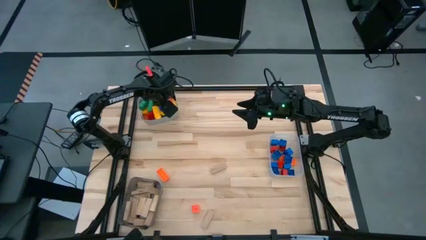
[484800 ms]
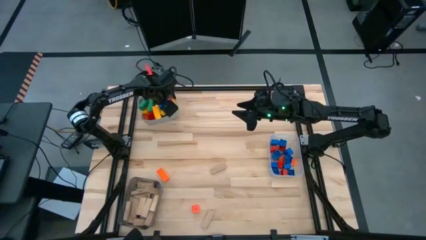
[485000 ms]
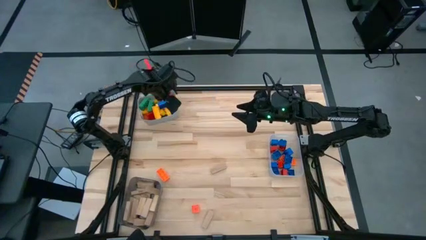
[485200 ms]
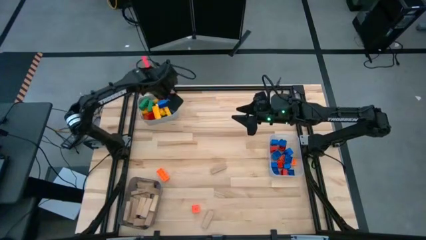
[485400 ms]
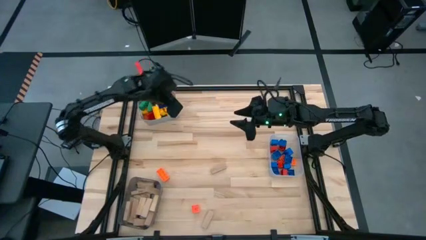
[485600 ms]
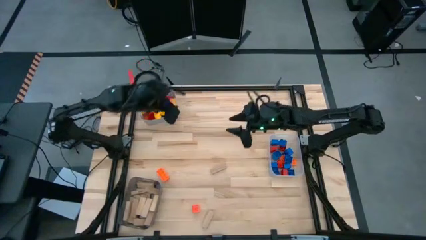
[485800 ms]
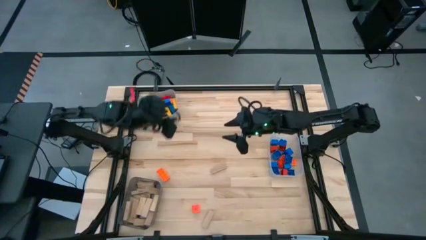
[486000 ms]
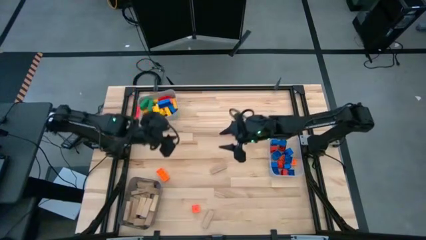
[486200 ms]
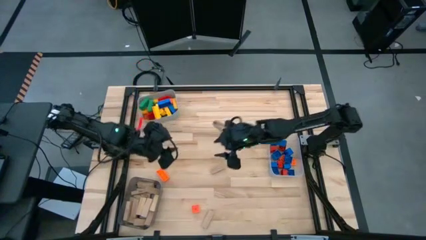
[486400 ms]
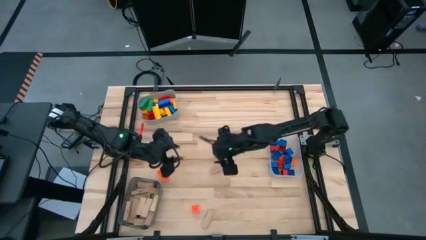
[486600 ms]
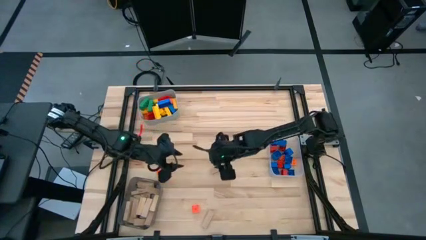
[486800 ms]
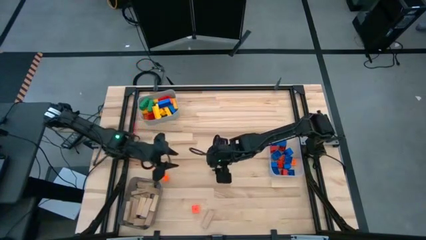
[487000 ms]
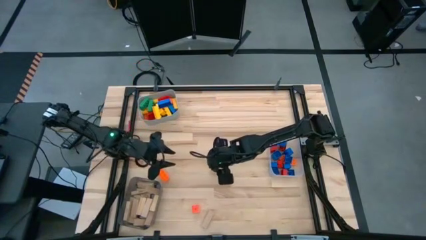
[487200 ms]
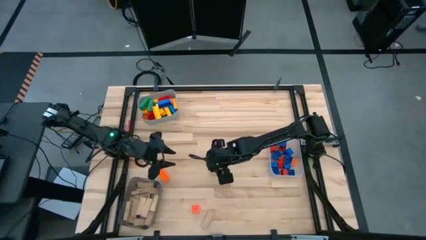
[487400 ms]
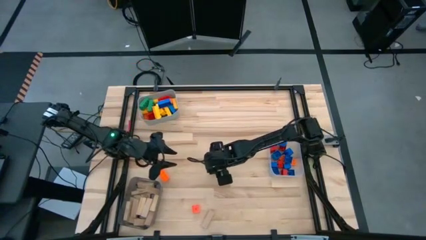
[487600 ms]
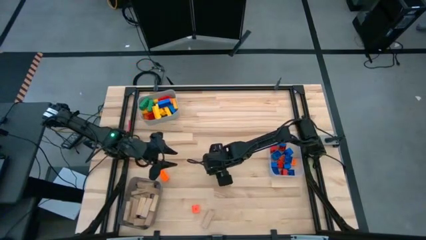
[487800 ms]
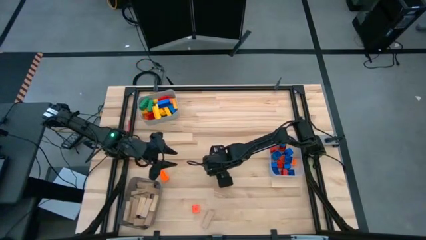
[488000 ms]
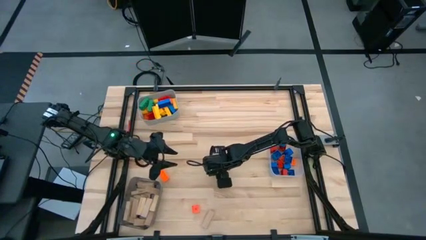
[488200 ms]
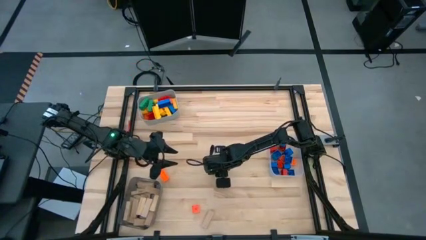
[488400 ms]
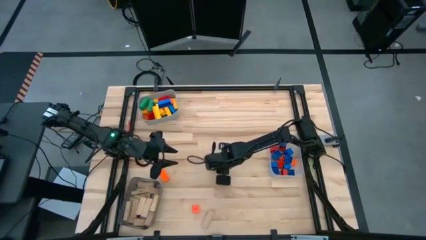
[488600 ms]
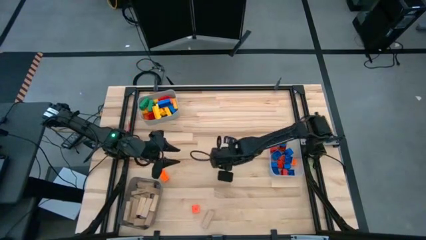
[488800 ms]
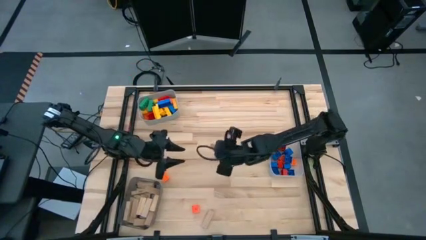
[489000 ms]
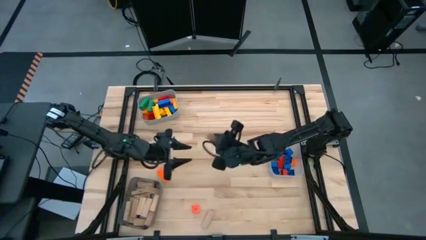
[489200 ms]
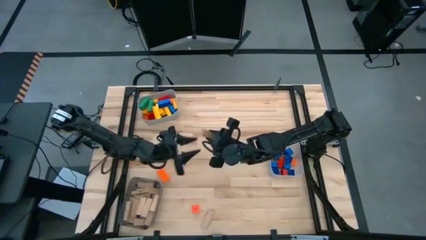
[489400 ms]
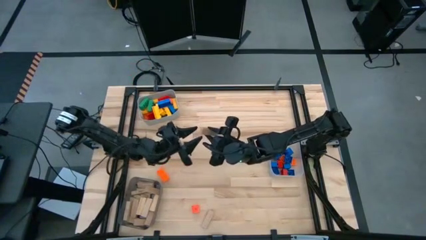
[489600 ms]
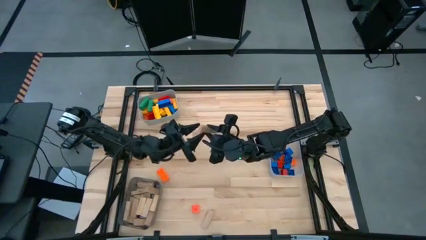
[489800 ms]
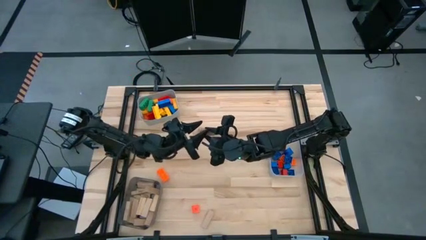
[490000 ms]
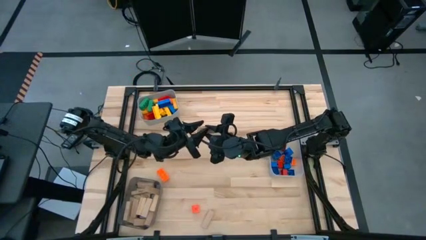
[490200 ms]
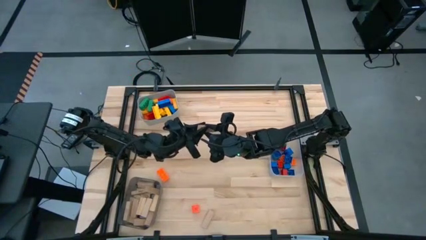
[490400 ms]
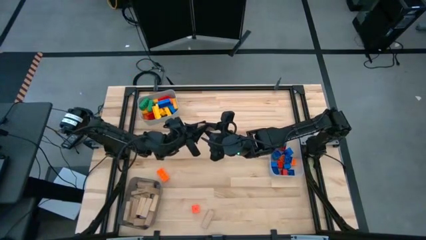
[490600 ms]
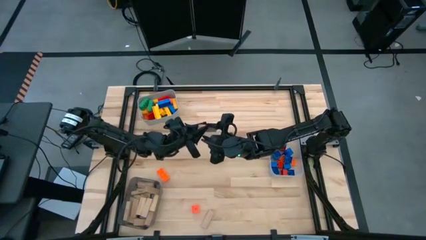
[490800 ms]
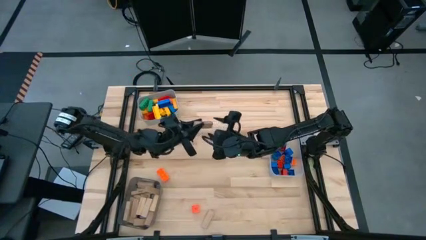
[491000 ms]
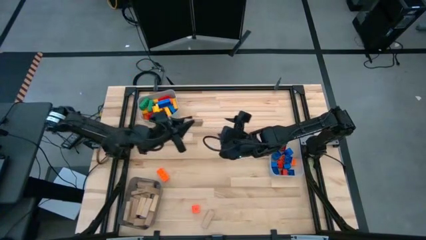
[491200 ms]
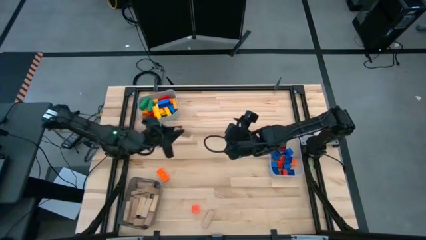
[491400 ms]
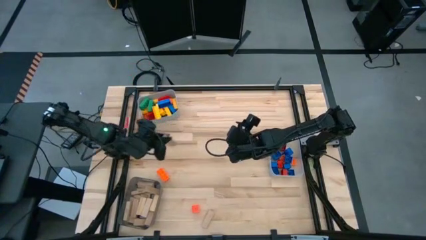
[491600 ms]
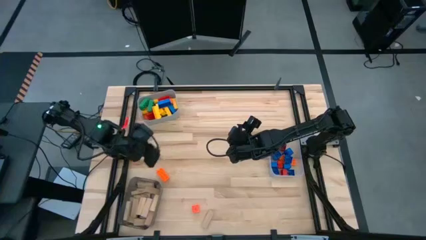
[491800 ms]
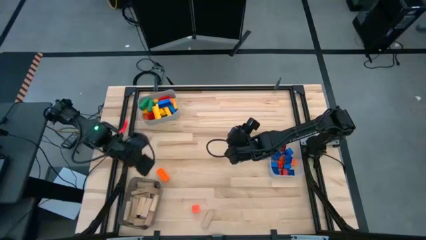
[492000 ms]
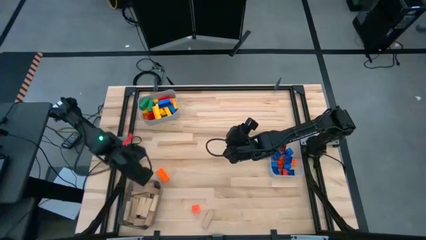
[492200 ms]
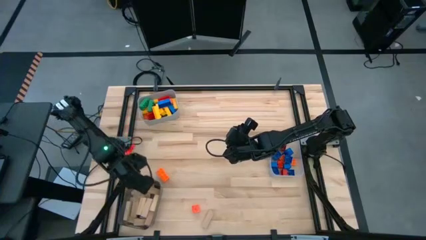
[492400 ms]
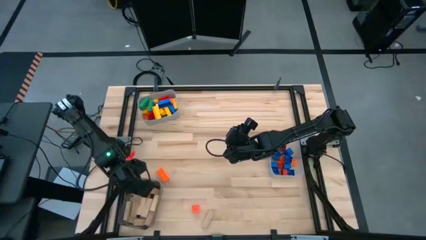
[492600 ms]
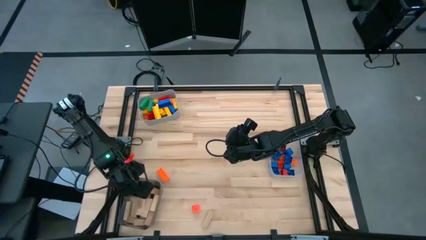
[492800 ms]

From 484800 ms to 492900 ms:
Task: Sort blocks by size
Put the brown block into the black bin

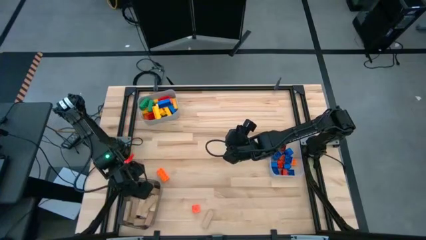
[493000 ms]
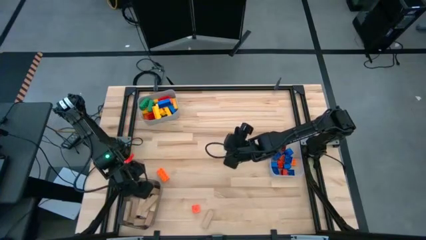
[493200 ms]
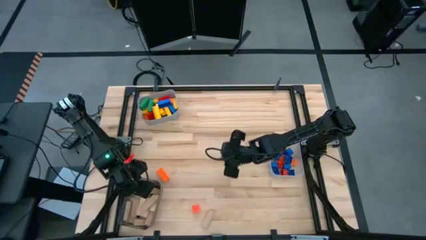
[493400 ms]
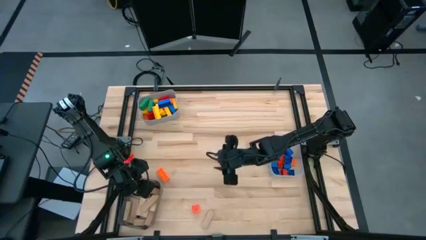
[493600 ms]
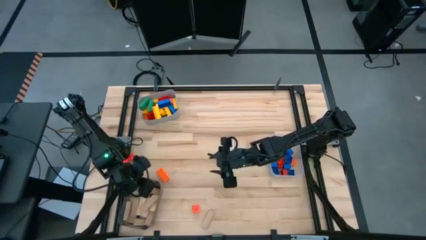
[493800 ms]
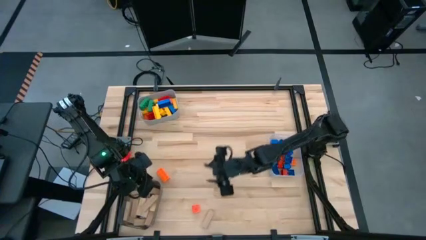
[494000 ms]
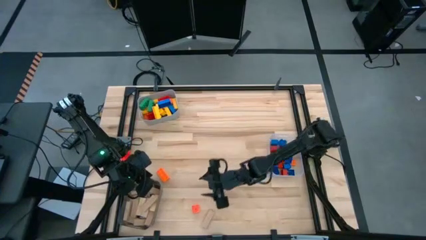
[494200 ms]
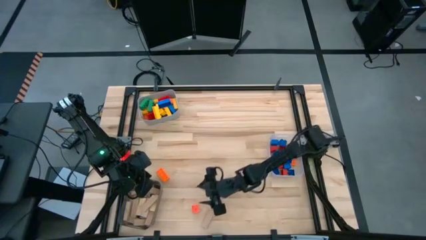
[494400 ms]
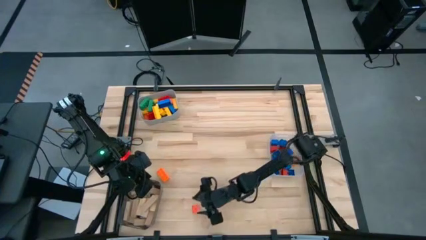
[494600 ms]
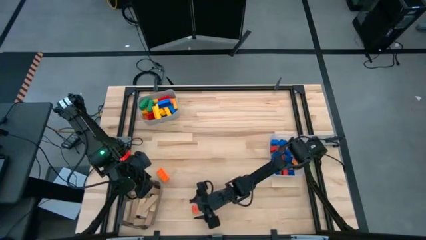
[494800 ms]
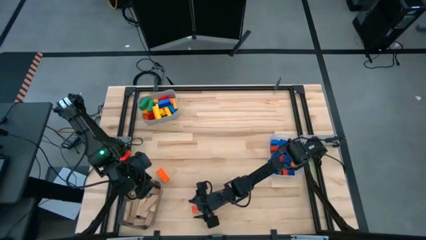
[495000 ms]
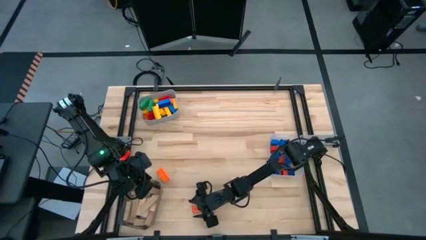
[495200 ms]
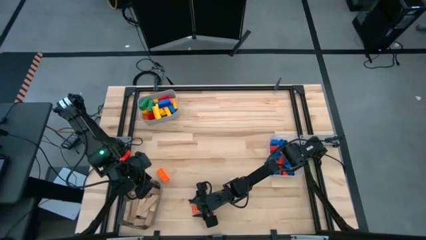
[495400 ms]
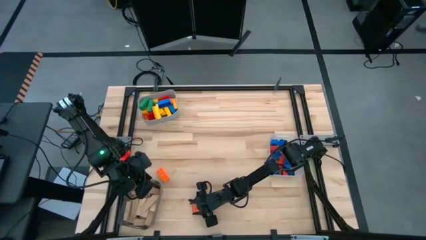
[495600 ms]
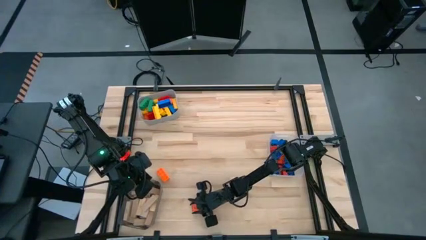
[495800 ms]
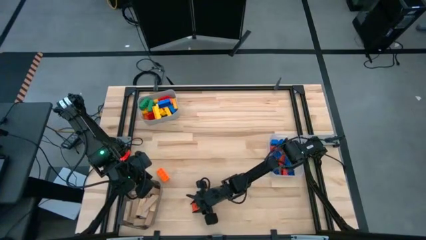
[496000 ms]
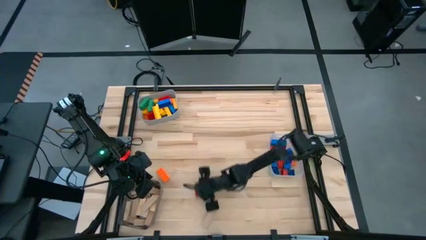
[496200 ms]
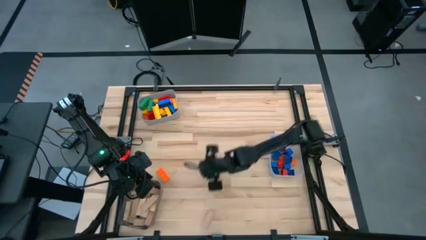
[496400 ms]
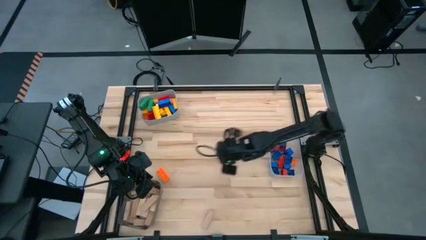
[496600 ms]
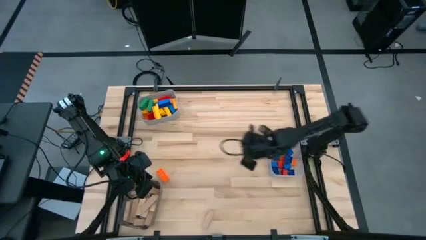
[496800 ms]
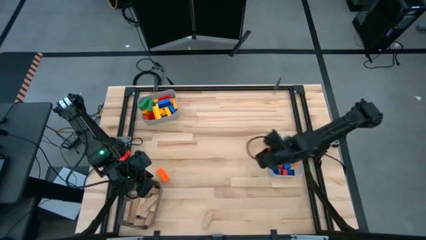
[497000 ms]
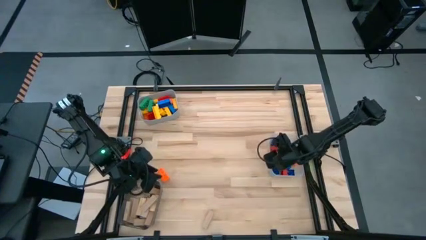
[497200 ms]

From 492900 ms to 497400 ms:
Put the small orange game piece into the transparent bin
